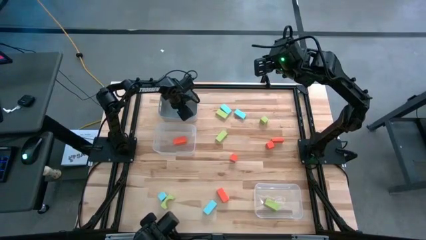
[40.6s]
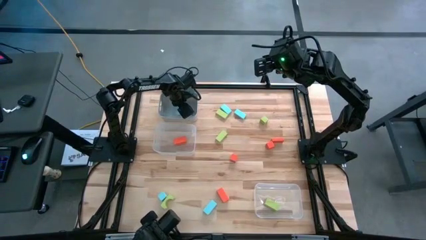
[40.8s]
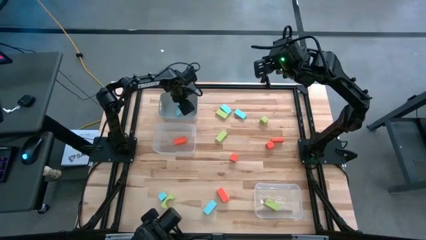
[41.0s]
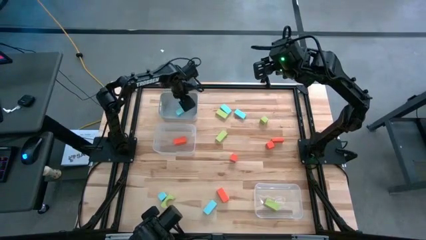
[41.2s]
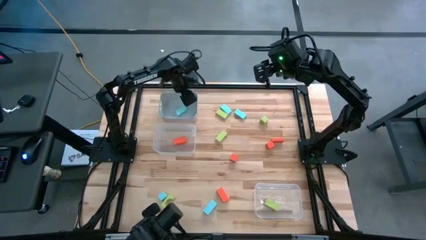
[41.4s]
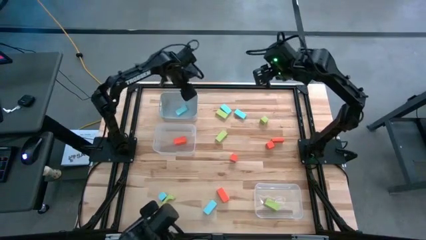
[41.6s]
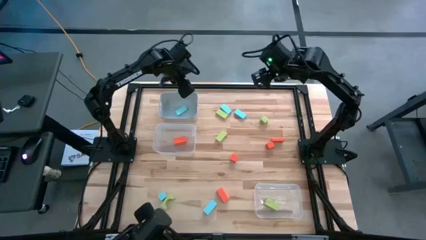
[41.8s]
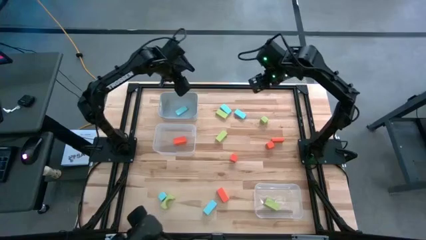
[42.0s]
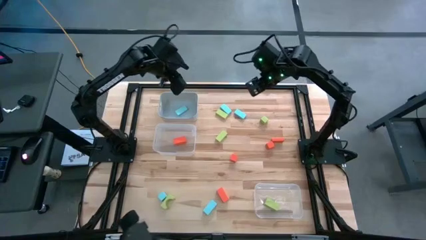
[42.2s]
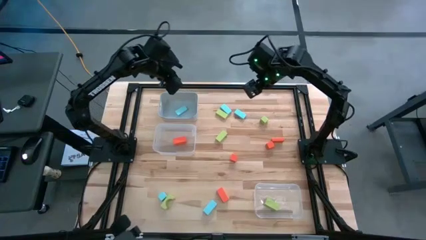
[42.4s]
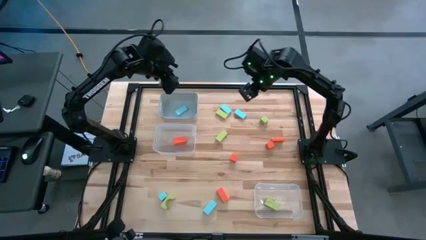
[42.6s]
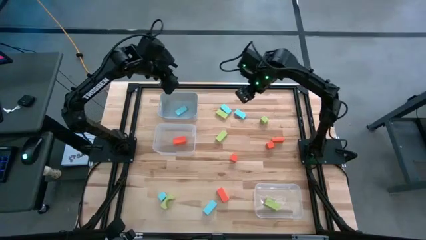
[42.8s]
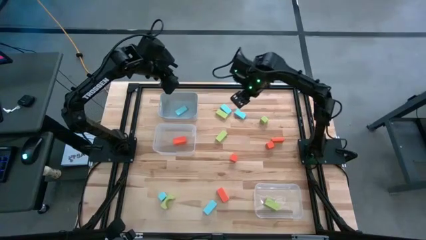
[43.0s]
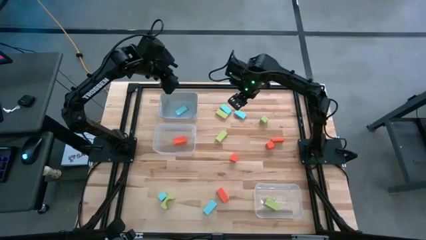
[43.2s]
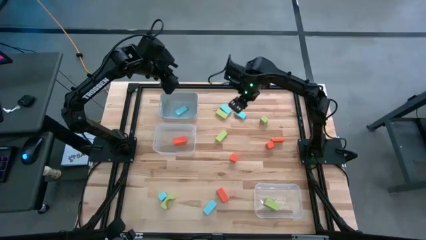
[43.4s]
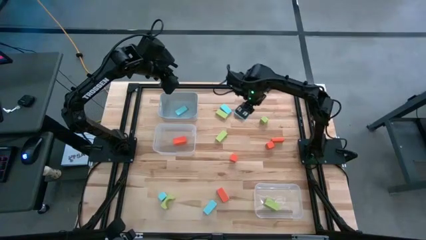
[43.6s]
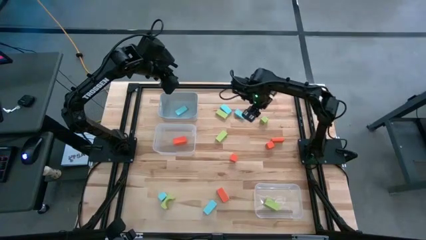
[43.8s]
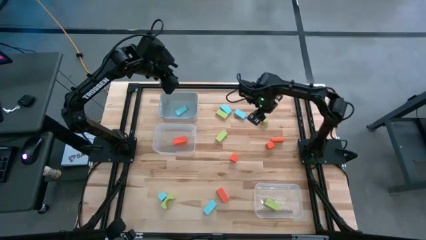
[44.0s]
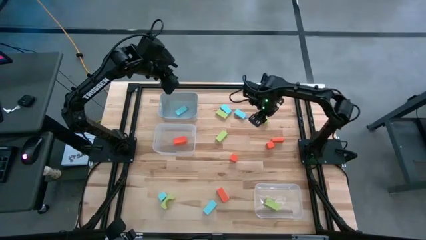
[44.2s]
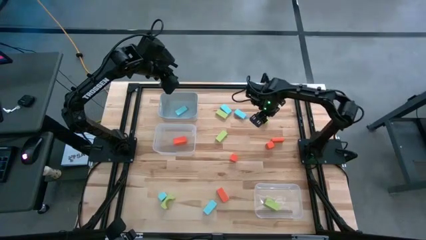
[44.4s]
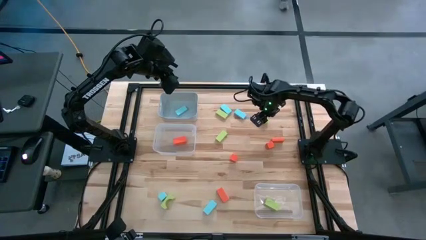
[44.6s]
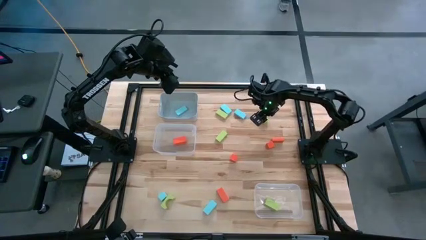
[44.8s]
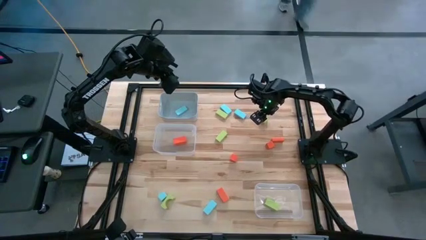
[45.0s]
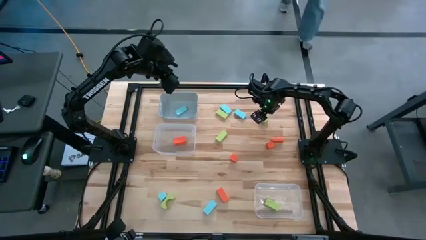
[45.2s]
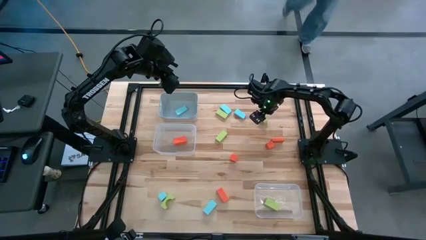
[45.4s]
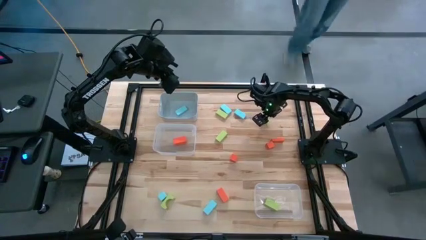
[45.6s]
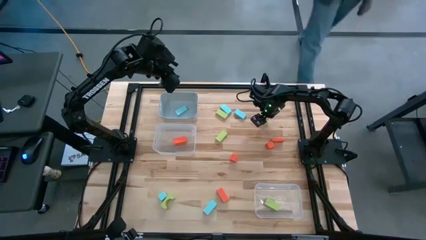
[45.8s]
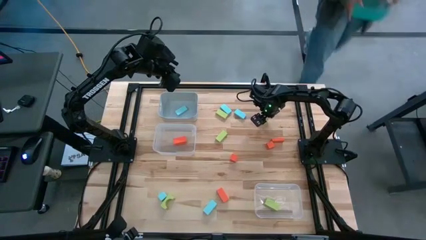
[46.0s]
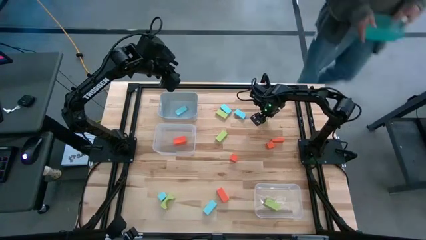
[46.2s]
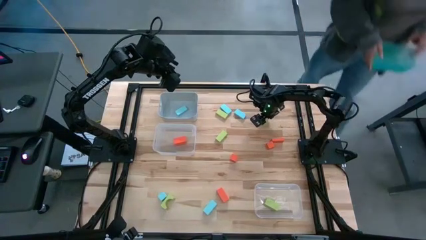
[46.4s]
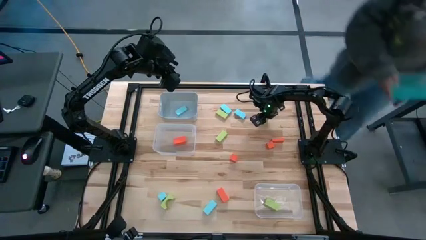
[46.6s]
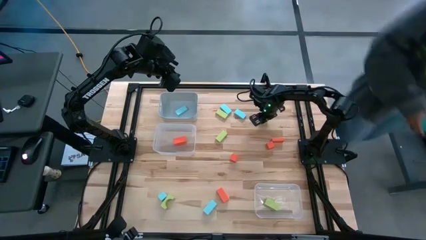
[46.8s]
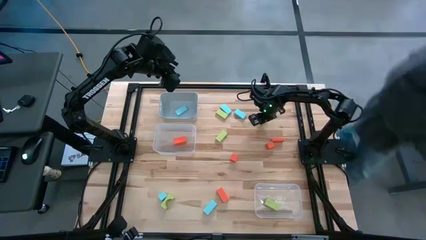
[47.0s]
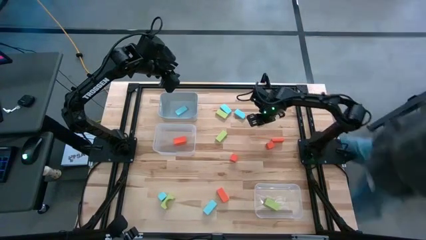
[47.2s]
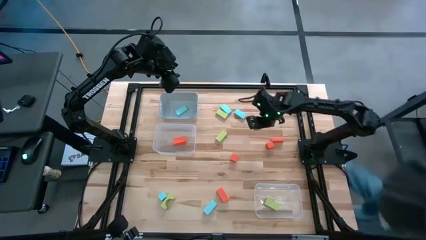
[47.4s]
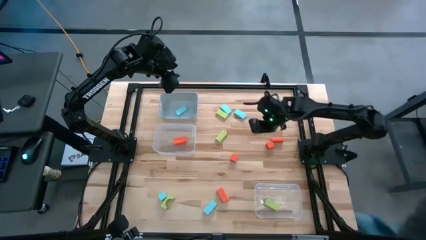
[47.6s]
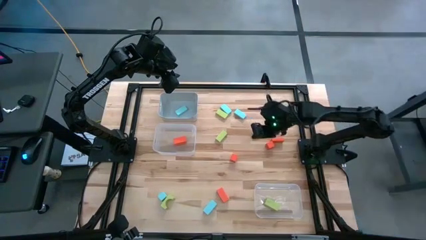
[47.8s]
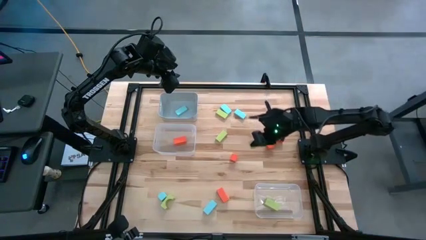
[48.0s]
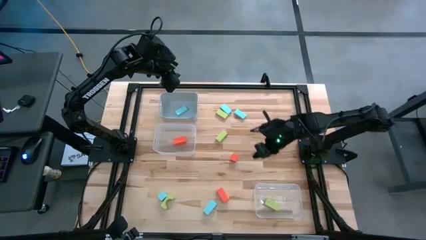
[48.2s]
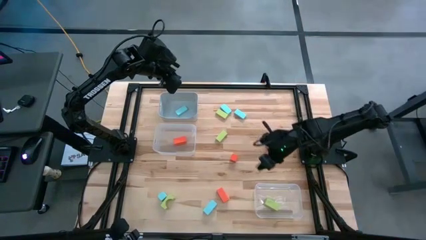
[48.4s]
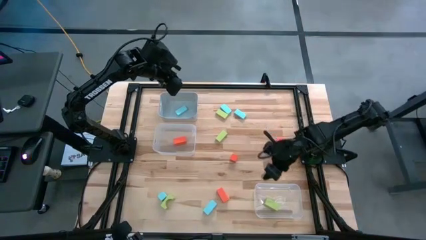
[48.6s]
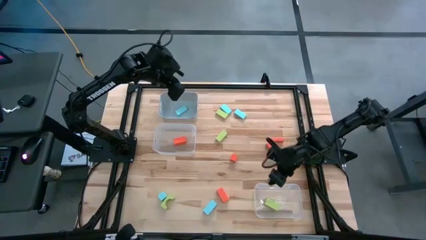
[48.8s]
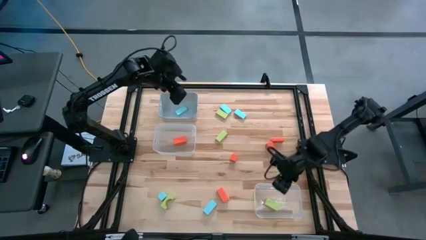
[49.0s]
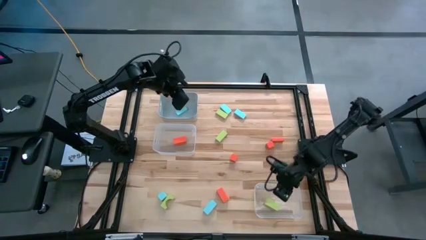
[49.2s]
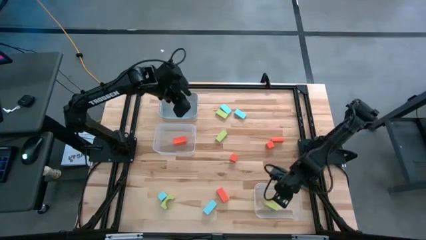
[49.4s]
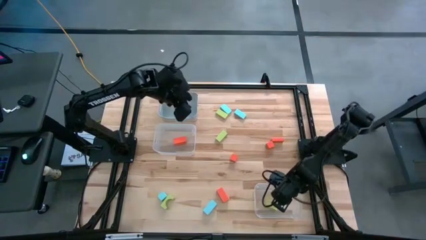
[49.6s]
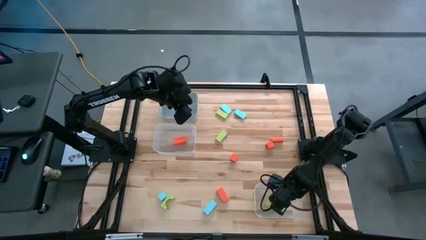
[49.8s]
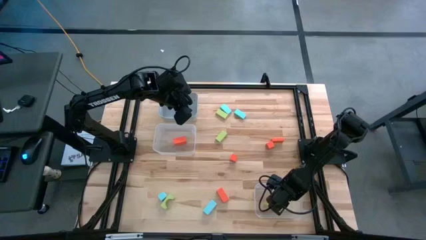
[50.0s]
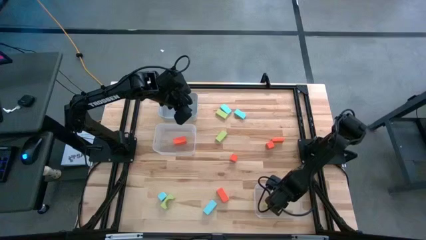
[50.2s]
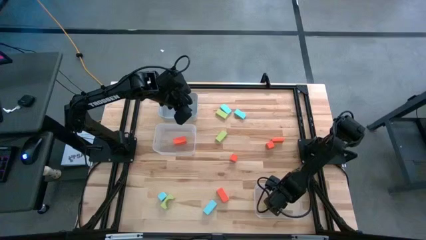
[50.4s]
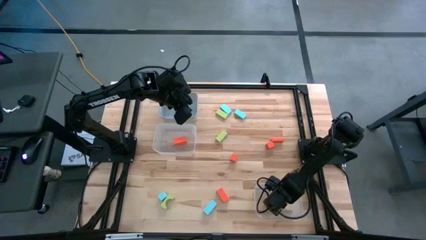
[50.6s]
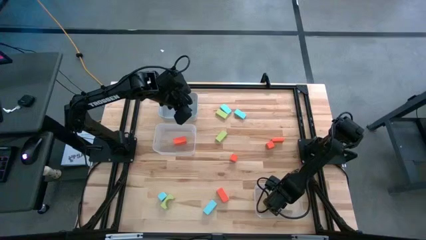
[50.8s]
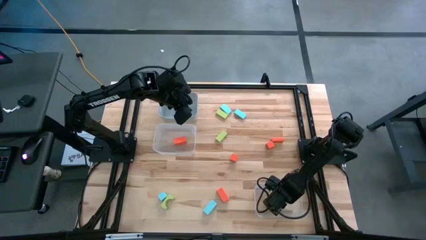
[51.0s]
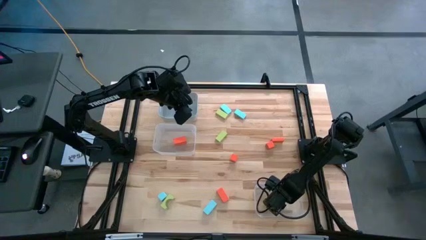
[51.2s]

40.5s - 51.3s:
Task: Sort & place blocks by color
Put the green block into the bottom transparent bin

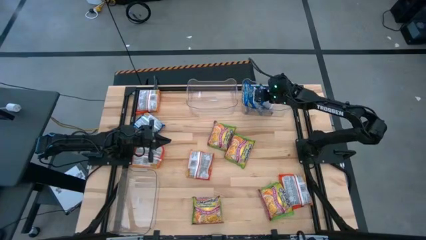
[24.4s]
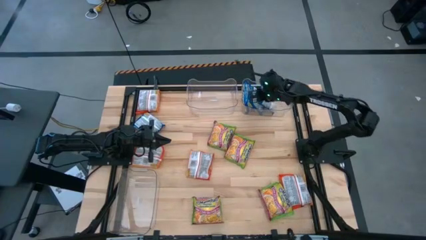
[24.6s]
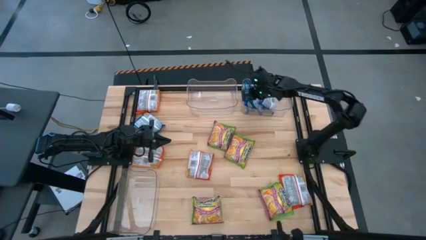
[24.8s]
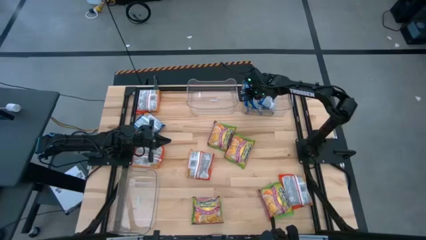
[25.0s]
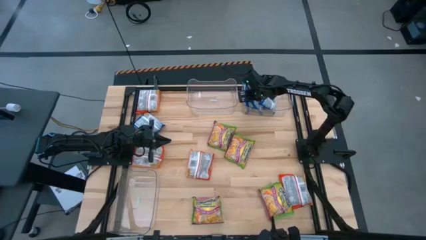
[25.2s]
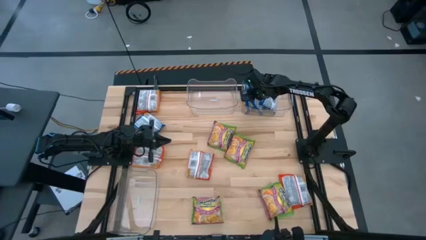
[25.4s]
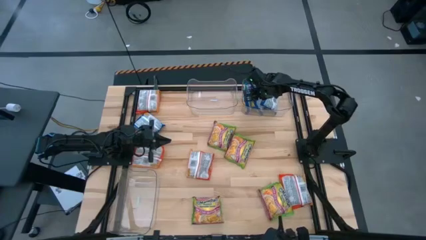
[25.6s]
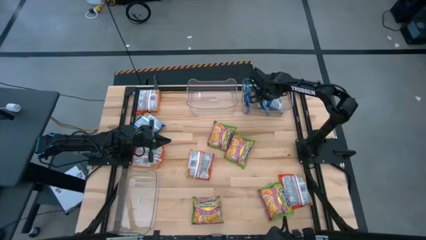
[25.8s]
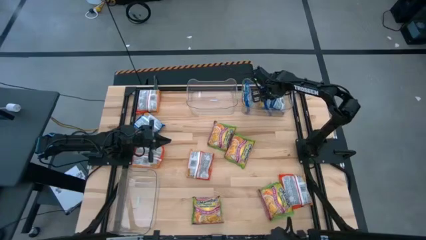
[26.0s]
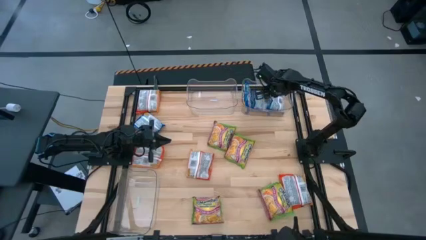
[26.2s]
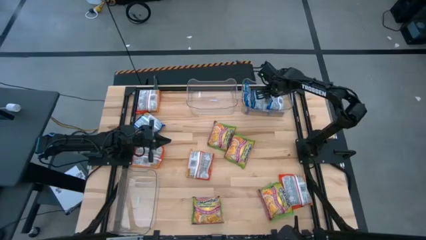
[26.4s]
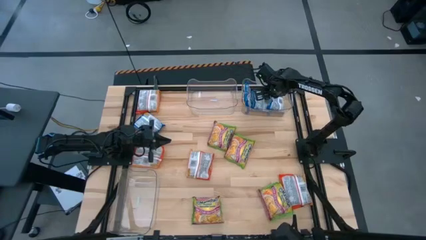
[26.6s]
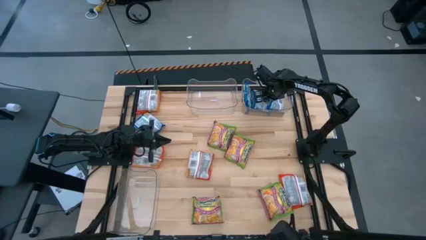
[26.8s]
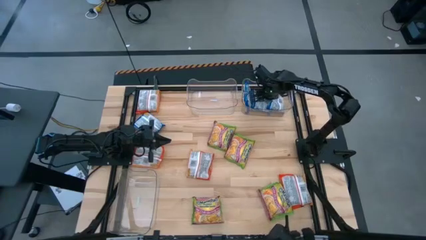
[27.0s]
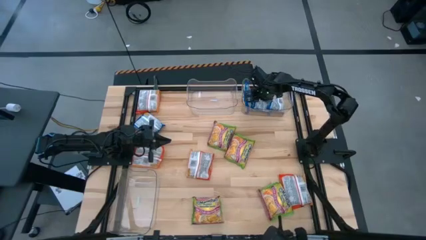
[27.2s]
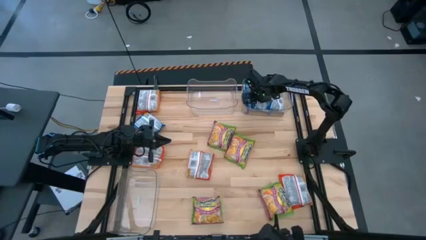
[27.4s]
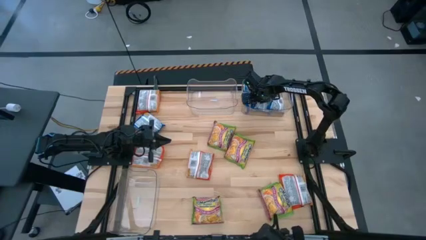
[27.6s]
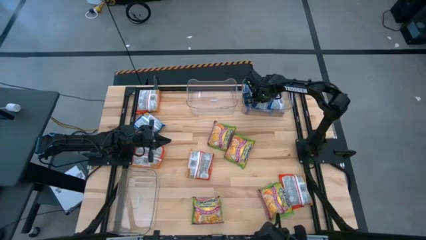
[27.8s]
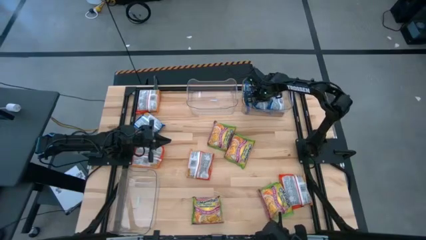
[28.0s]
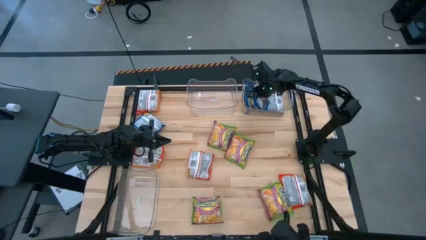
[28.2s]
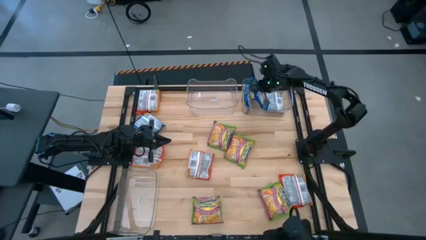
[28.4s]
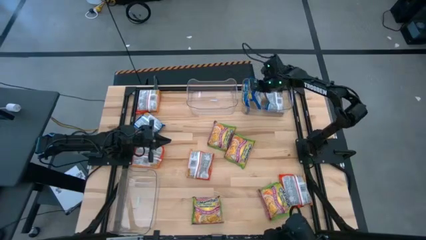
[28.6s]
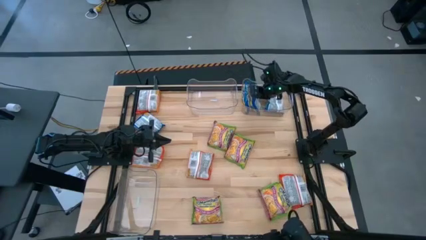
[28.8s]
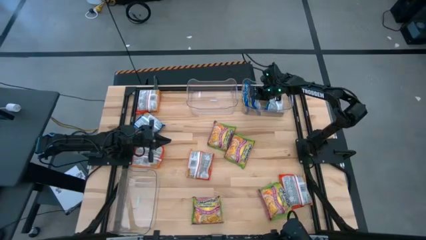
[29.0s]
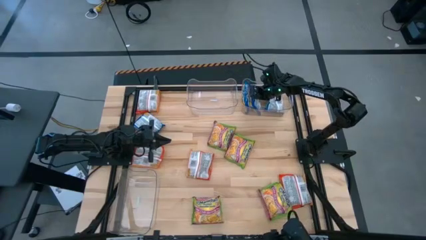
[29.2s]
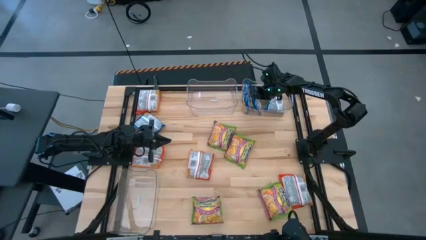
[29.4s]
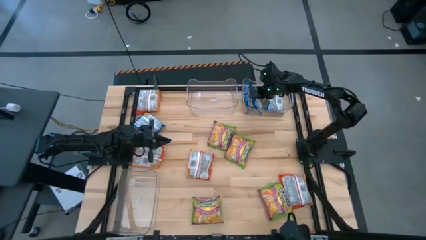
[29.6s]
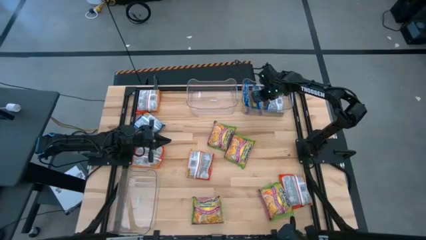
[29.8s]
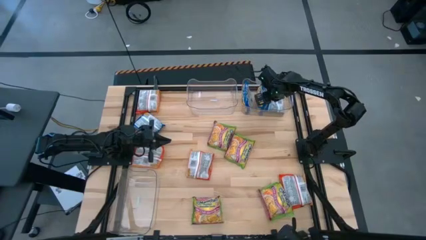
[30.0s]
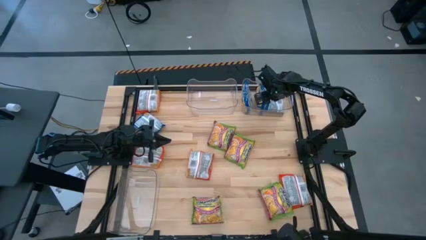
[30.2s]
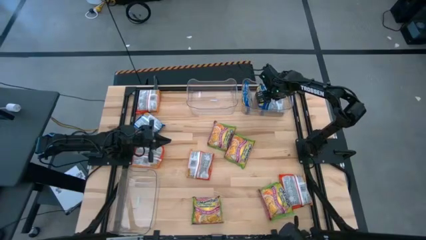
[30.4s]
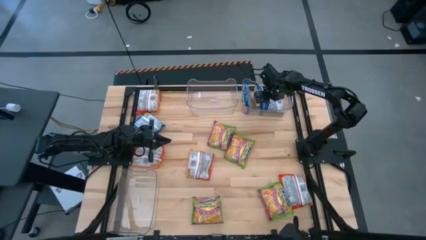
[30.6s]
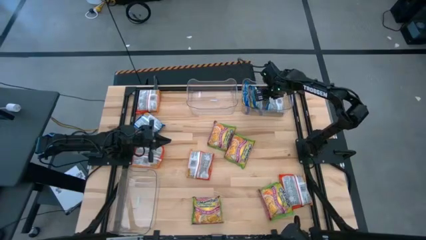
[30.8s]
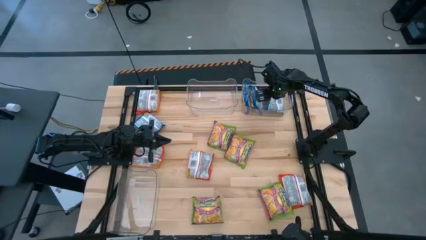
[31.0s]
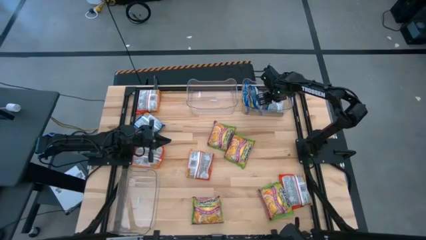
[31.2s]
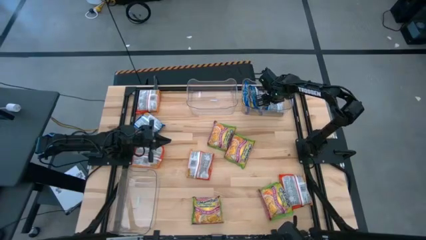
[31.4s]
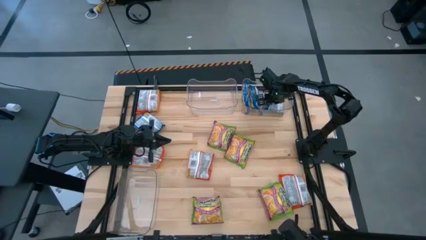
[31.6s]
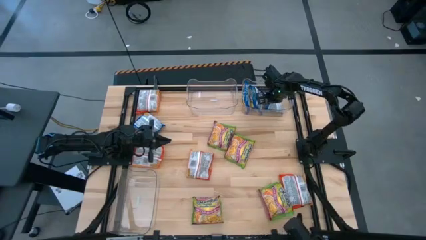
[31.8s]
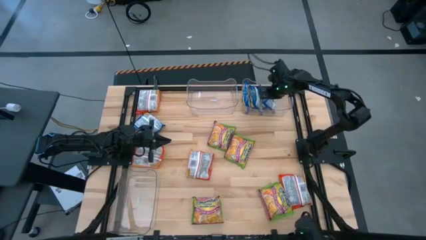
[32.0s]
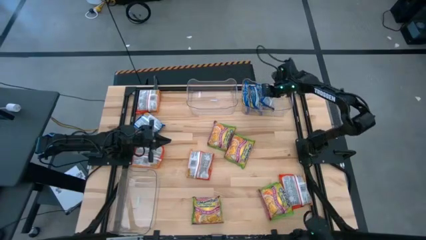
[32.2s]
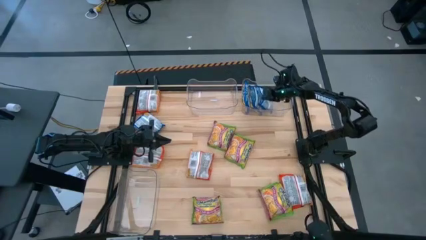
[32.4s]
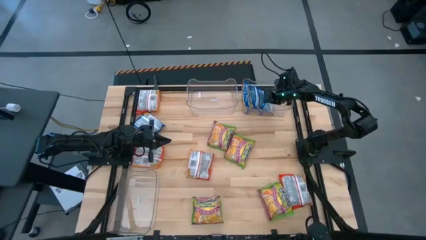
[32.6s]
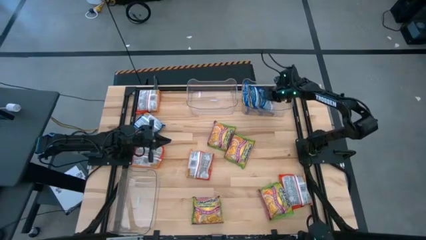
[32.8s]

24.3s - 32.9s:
Task: Sort Maruchan noodles
Adjust the blue noodle packs in the top right transparent bin
